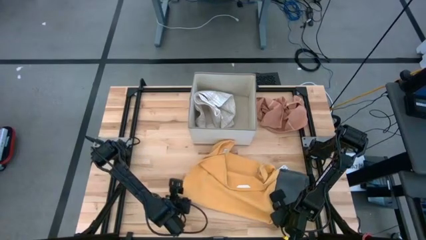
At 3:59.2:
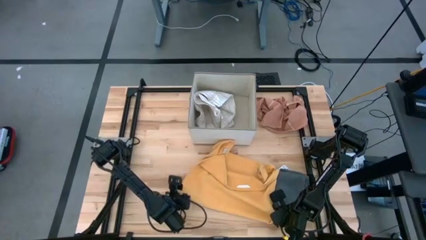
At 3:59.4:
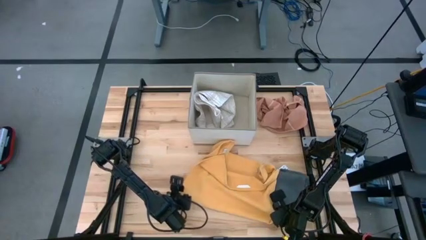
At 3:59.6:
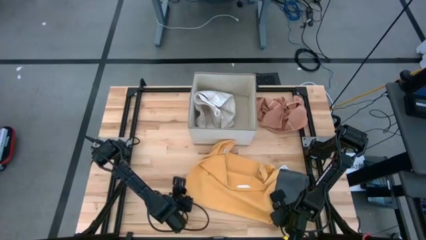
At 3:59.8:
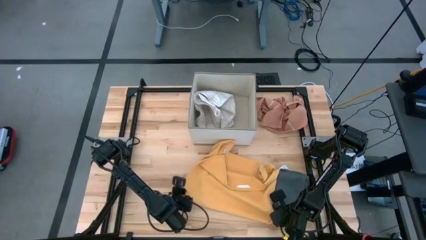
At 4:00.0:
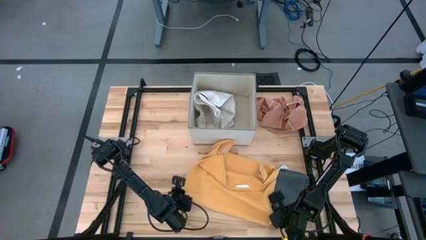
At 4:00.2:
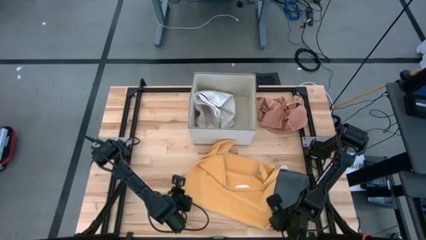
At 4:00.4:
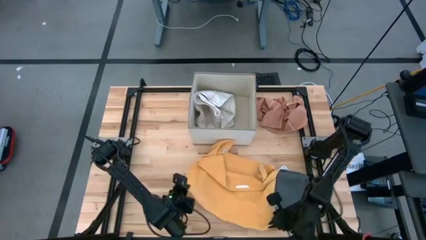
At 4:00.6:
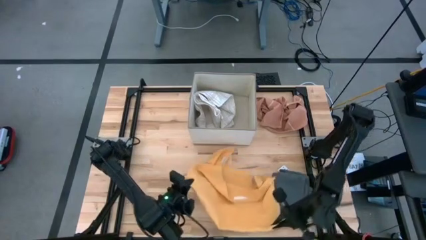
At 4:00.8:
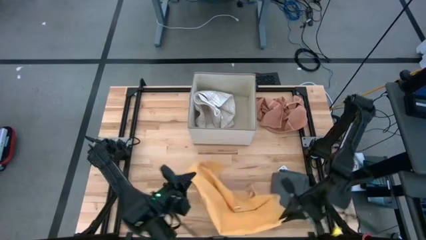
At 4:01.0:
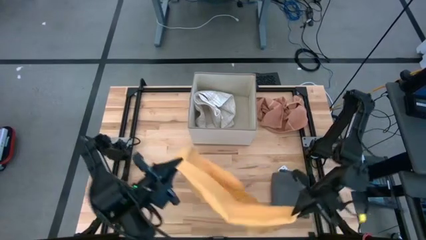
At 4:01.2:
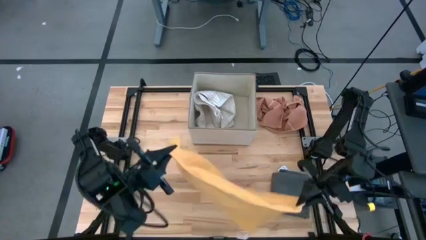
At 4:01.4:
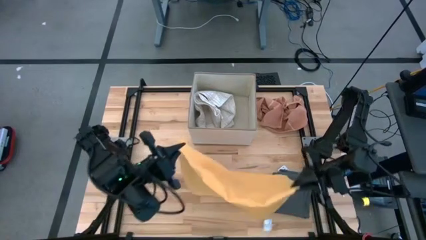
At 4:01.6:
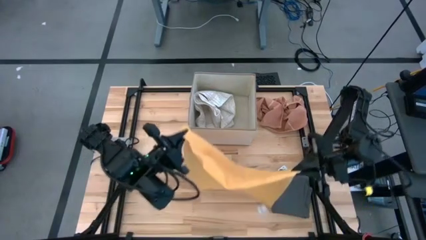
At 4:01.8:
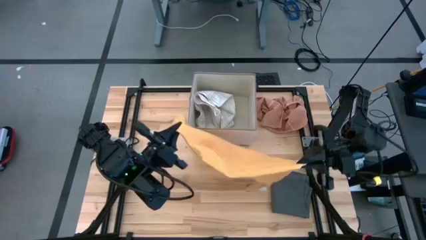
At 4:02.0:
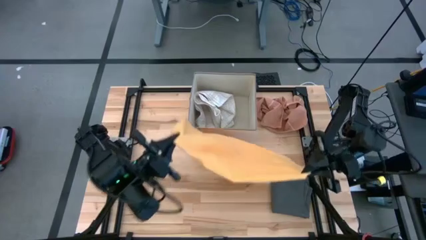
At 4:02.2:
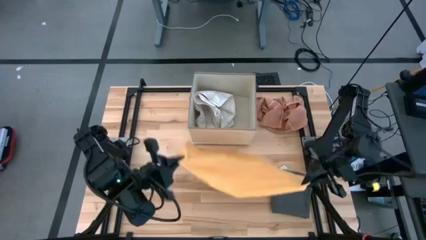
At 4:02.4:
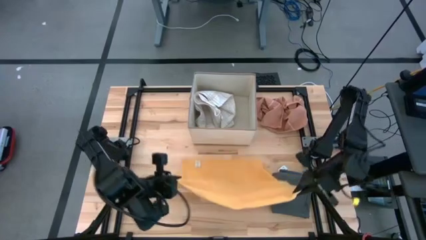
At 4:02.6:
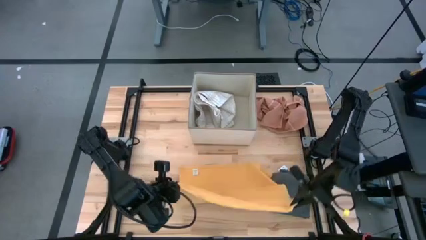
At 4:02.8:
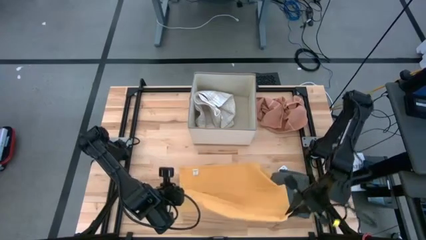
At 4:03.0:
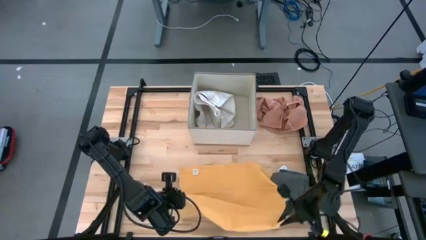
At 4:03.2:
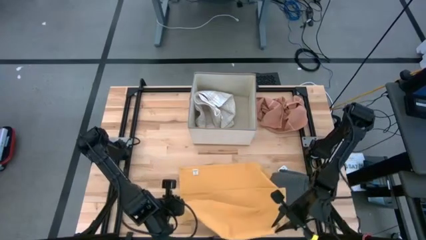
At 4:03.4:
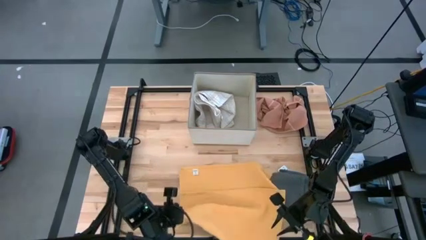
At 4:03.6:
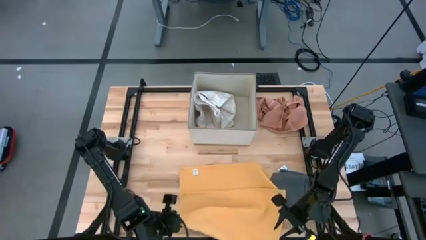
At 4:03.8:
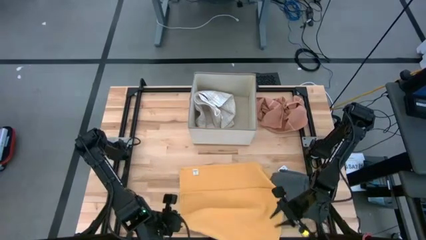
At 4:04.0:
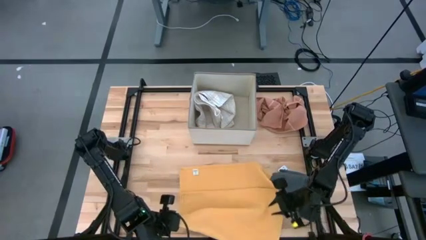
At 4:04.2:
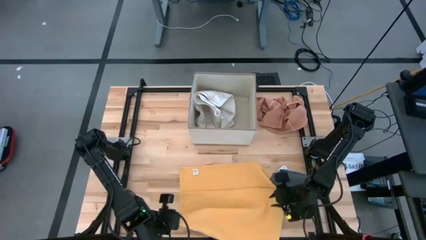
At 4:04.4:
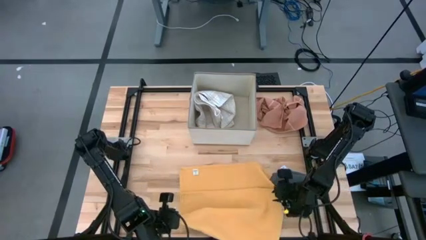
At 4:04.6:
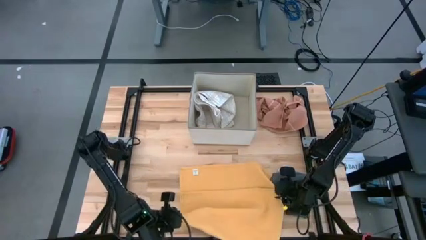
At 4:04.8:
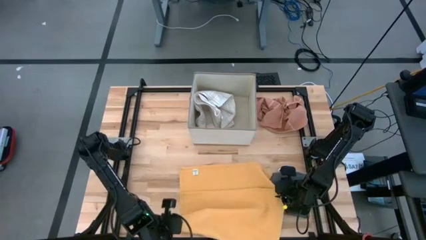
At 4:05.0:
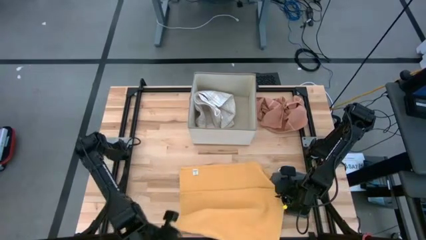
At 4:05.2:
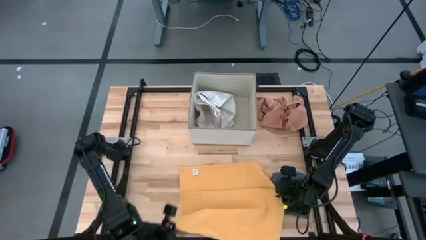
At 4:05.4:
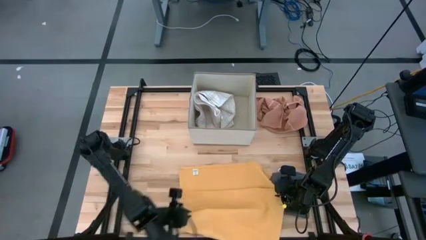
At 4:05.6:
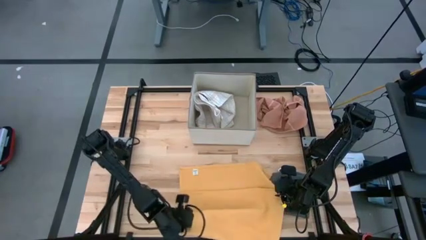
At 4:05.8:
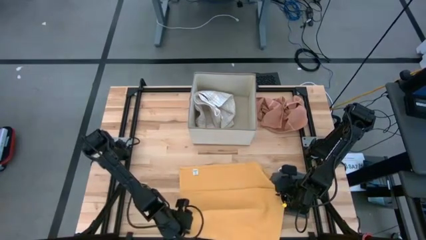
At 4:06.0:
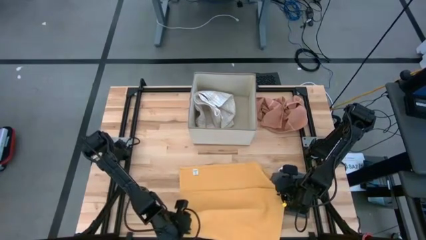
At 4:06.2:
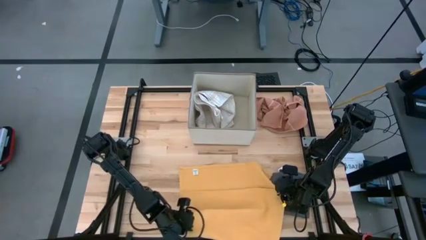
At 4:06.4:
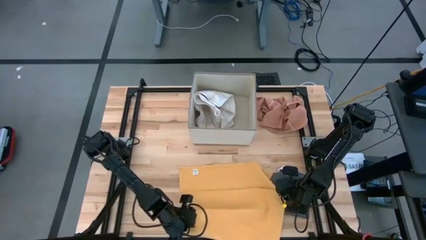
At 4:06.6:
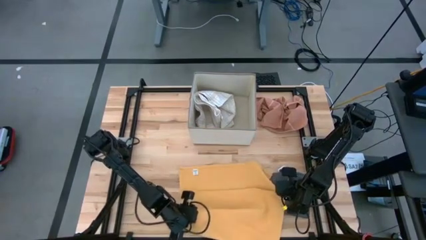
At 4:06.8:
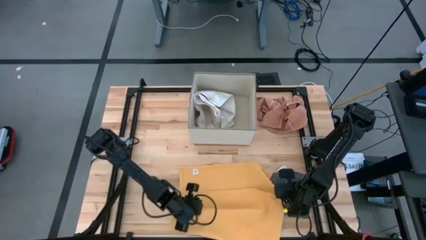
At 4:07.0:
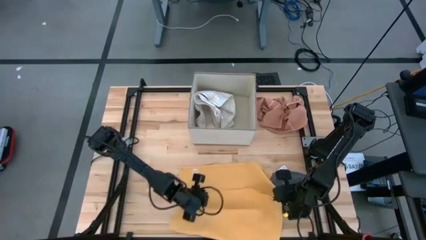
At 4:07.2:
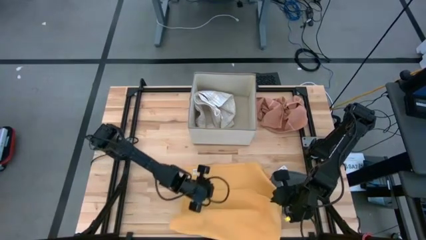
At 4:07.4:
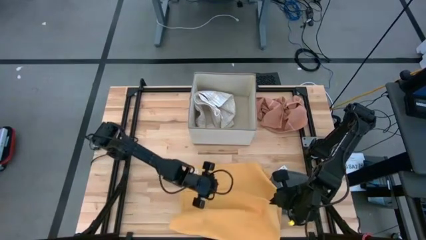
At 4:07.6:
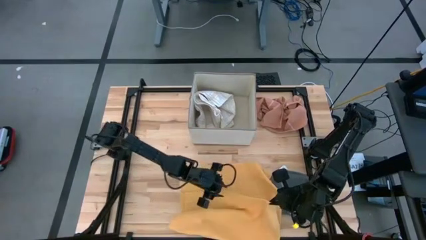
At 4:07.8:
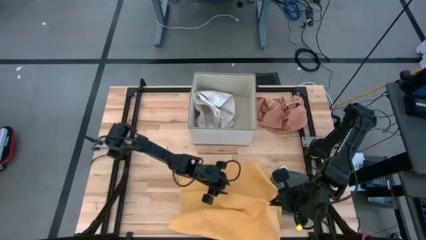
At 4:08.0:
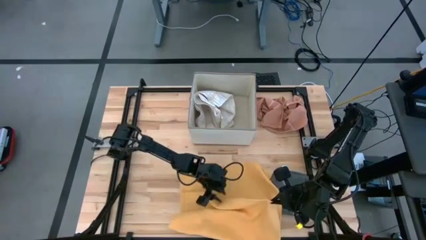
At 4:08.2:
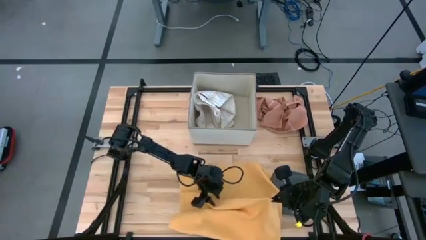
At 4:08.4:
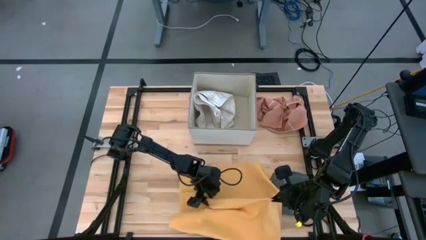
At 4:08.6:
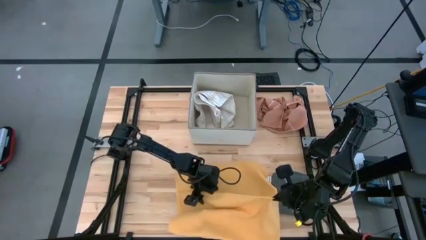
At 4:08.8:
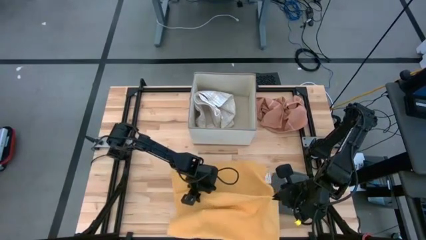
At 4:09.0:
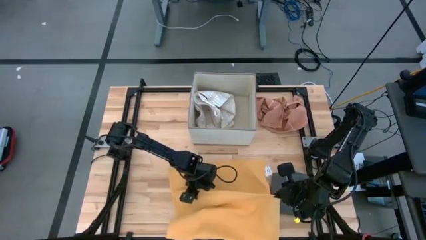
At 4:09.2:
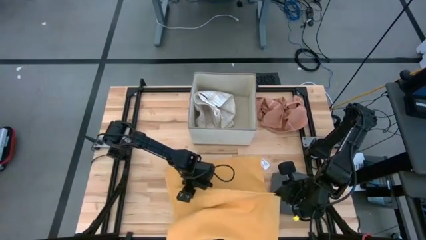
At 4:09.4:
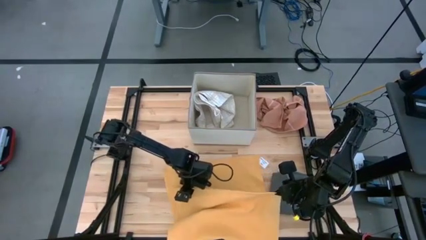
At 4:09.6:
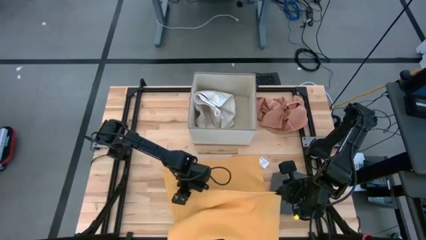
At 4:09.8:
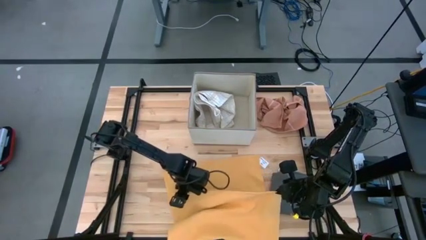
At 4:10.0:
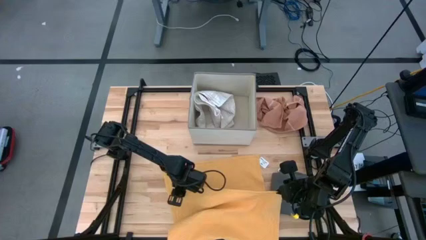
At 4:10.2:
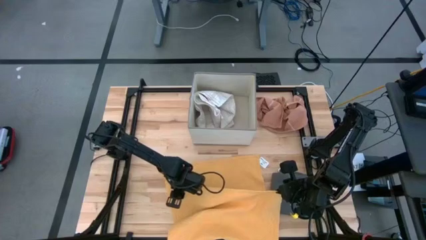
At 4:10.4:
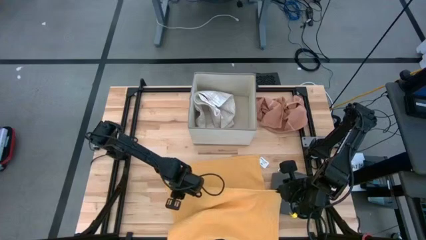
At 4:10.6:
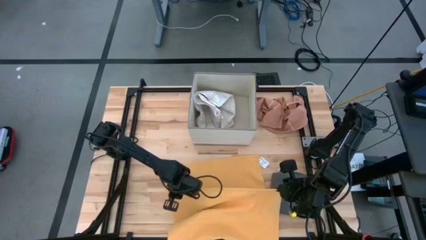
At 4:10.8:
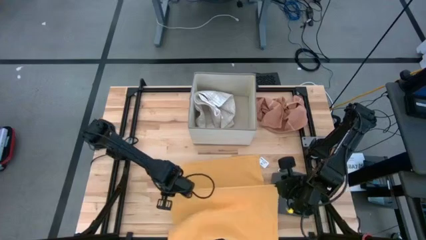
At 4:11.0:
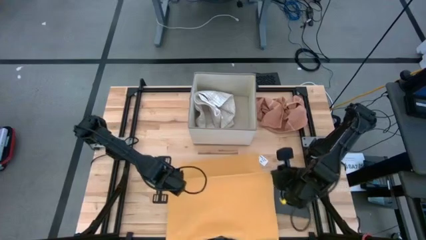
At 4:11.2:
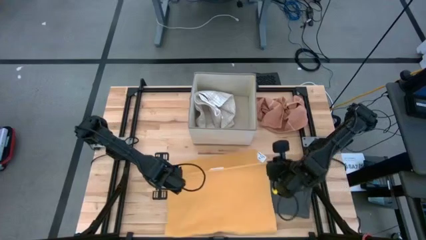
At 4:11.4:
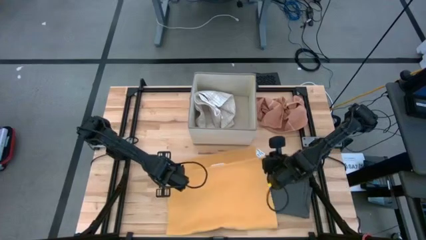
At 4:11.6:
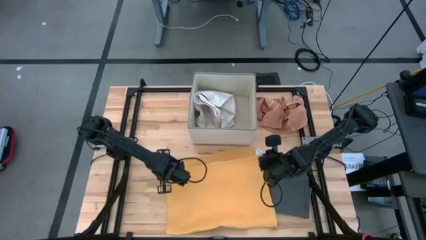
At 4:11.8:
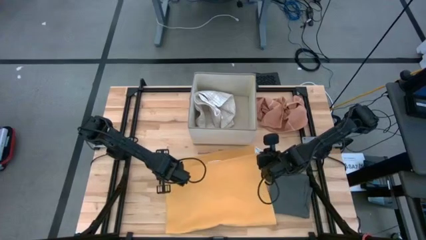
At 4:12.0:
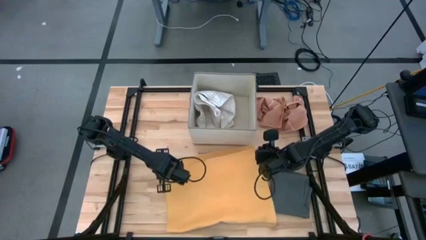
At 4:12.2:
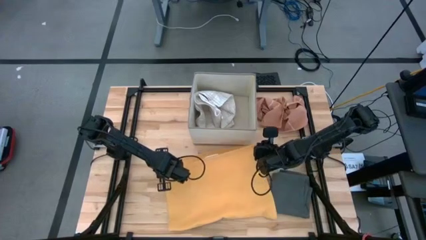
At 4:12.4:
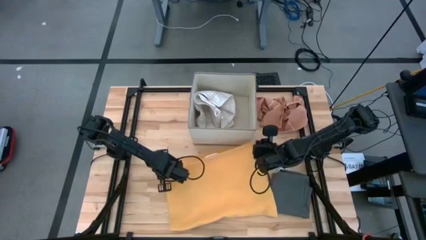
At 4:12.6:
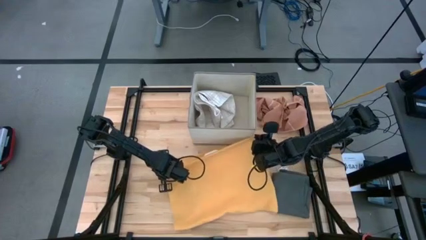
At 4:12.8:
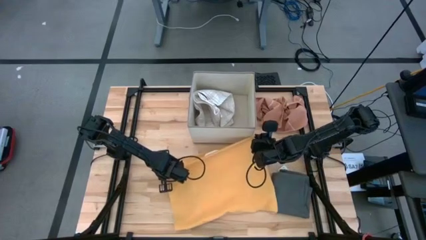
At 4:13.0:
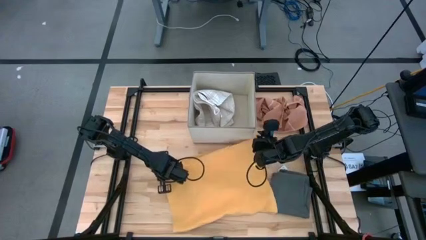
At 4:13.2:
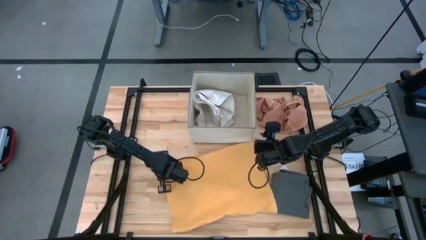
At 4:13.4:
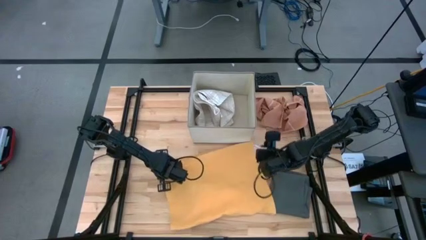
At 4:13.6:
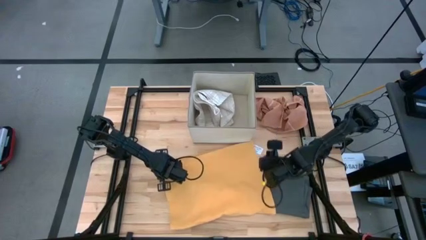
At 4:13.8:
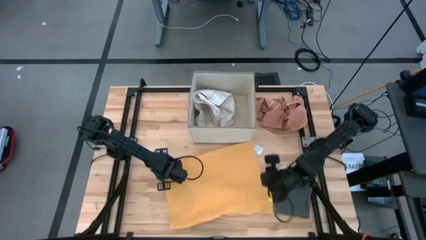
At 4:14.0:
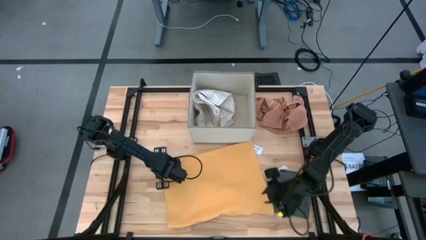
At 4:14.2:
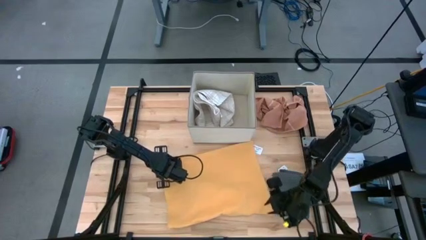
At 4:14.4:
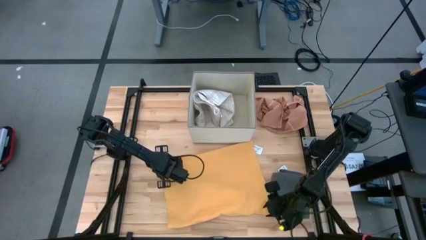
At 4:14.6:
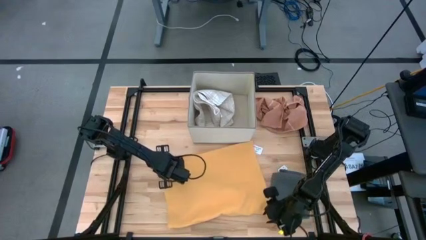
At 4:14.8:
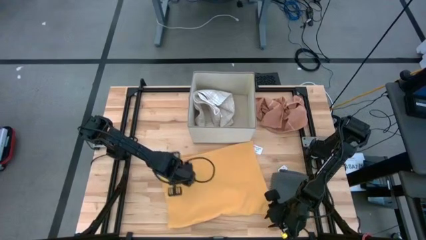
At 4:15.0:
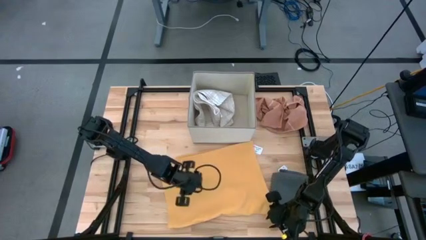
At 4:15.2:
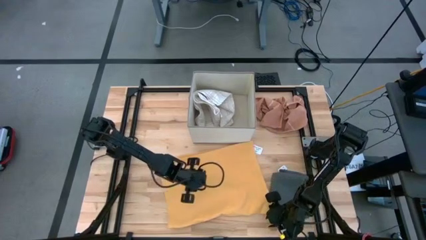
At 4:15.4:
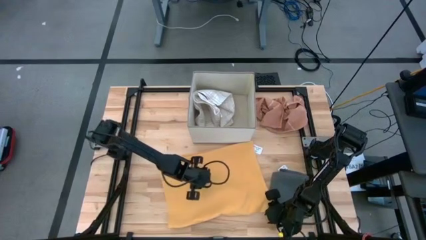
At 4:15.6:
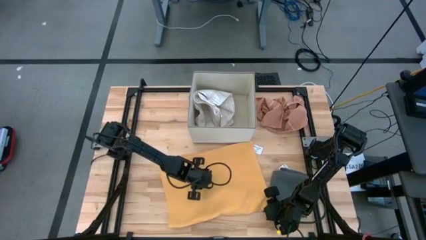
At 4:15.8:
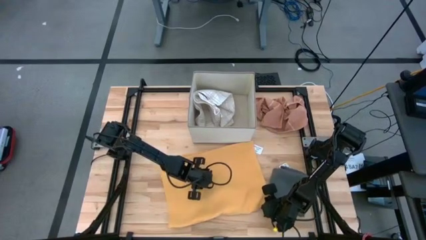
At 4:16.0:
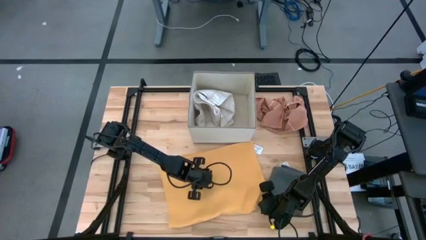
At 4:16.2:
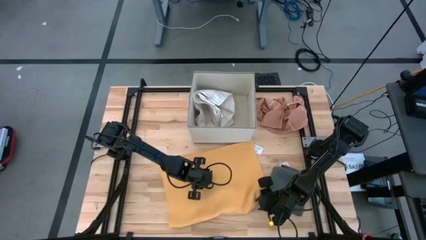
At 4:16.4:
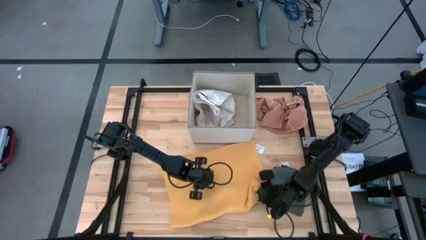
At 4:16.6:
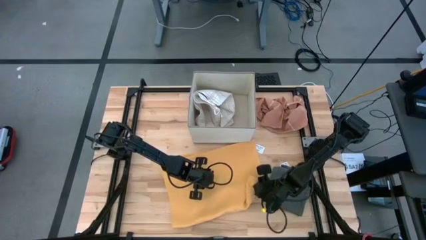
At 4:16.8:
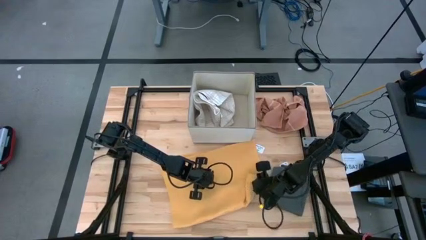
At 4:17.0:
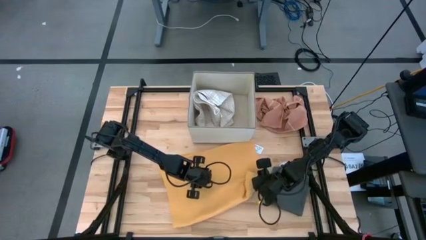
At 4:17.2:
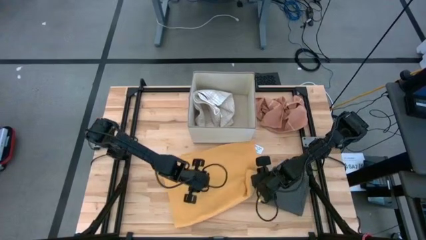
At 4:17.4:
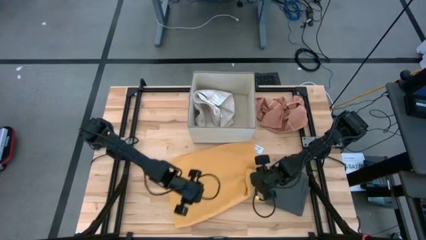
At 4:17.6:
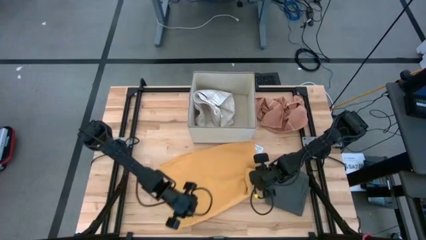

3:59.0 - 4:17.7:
Task: Fold towel
Fold the yellow towel
